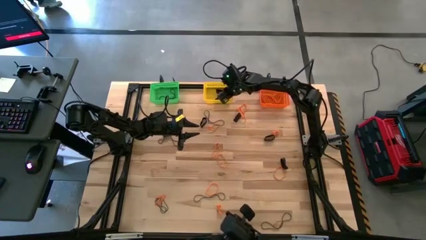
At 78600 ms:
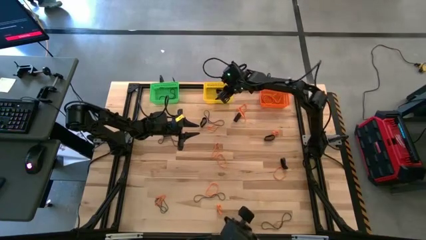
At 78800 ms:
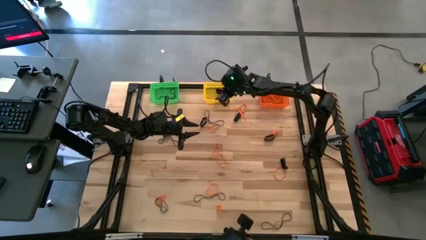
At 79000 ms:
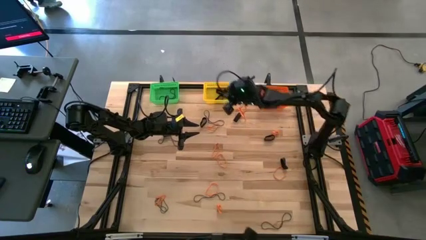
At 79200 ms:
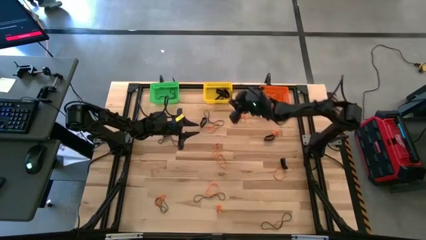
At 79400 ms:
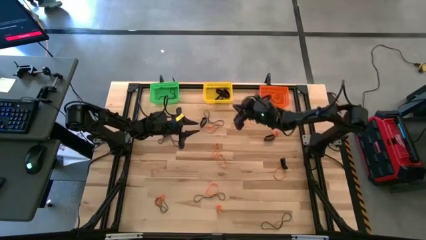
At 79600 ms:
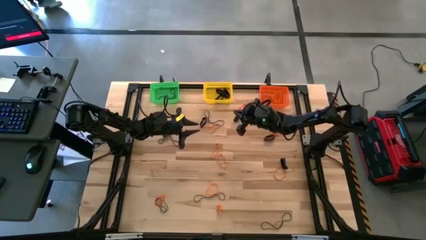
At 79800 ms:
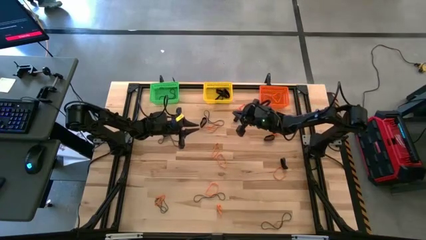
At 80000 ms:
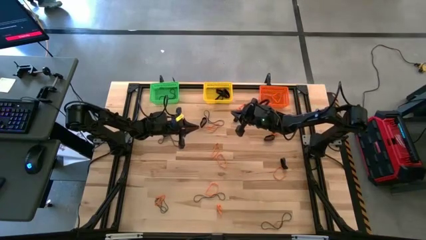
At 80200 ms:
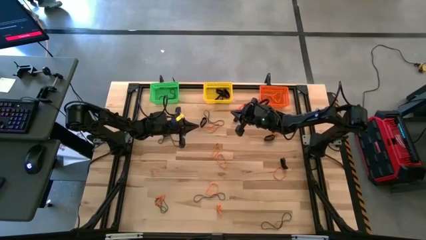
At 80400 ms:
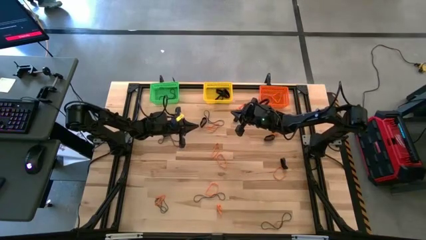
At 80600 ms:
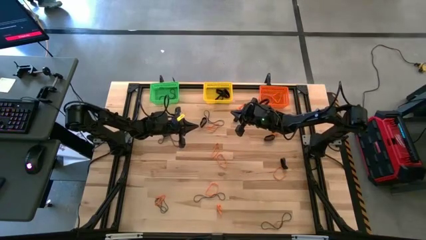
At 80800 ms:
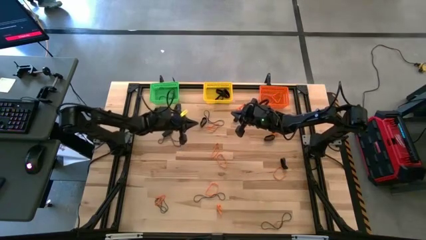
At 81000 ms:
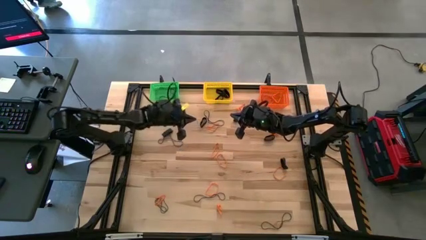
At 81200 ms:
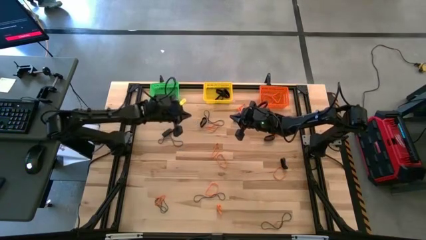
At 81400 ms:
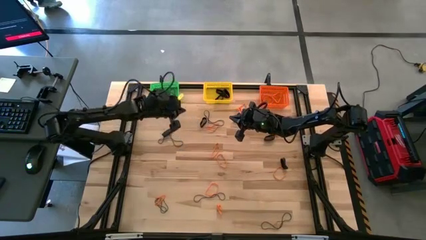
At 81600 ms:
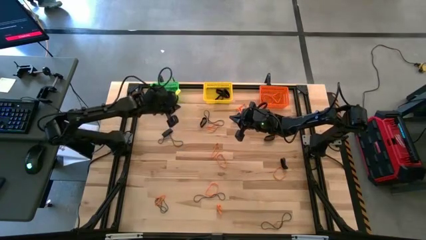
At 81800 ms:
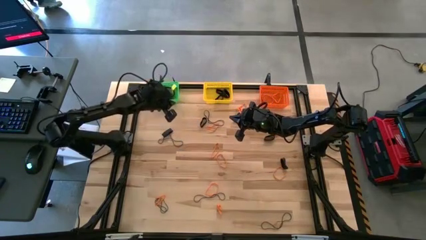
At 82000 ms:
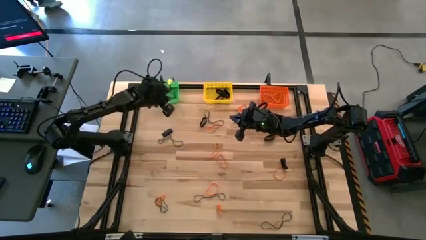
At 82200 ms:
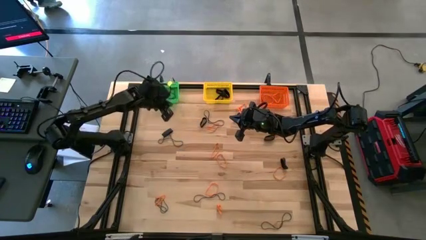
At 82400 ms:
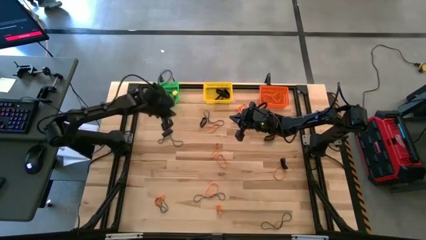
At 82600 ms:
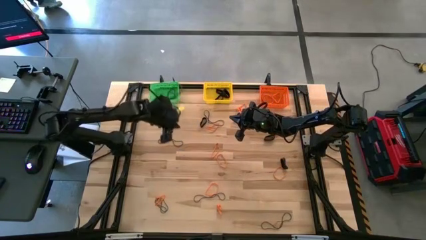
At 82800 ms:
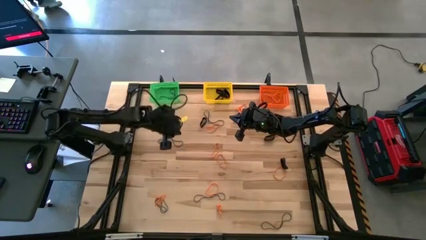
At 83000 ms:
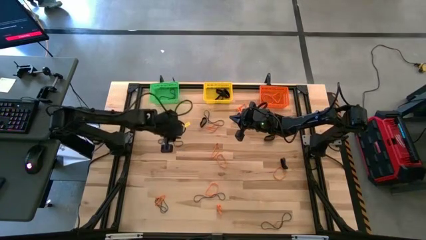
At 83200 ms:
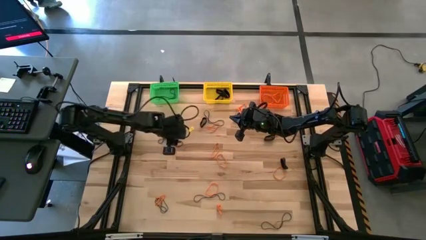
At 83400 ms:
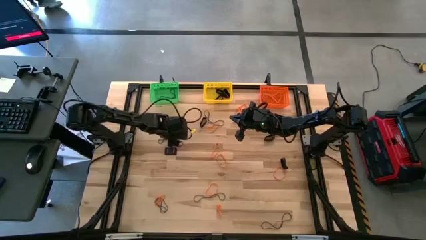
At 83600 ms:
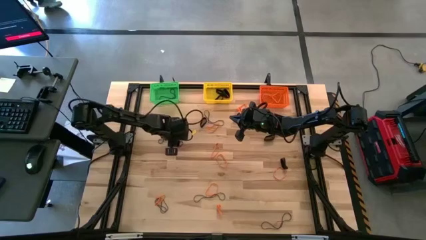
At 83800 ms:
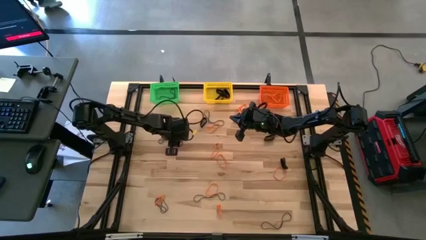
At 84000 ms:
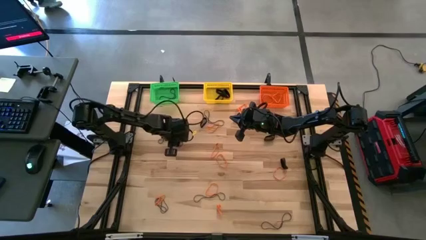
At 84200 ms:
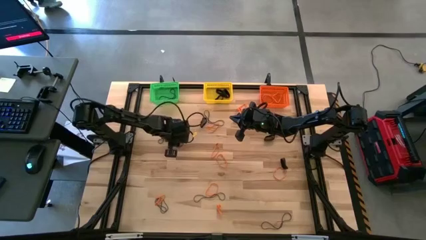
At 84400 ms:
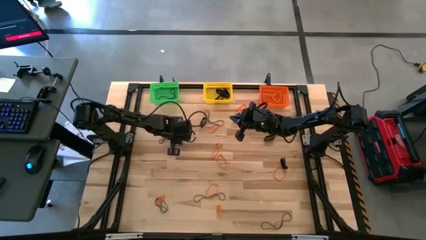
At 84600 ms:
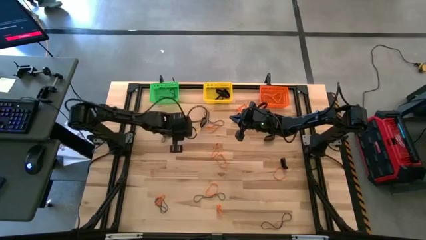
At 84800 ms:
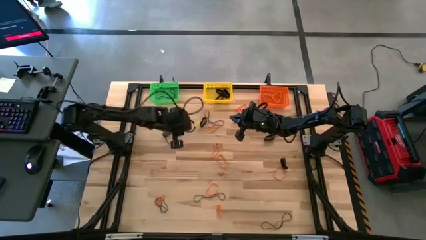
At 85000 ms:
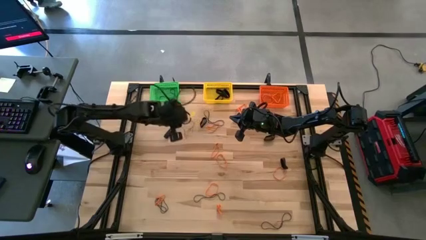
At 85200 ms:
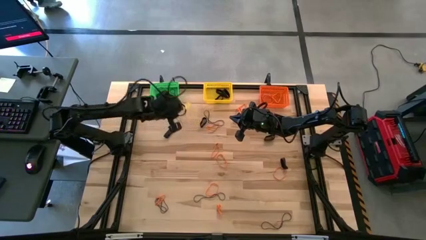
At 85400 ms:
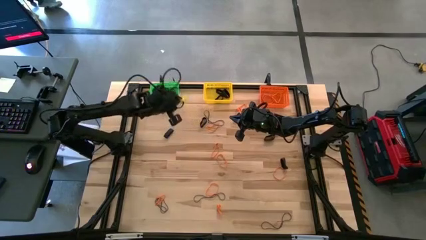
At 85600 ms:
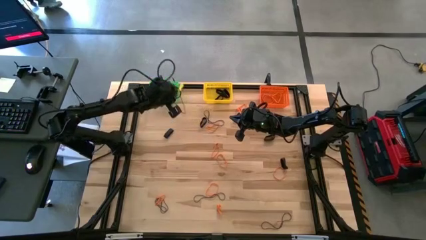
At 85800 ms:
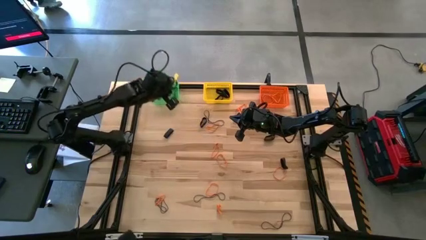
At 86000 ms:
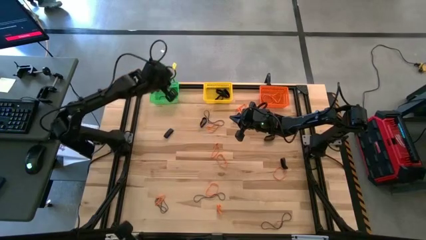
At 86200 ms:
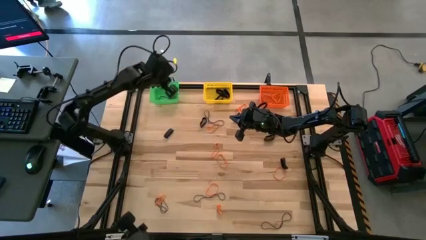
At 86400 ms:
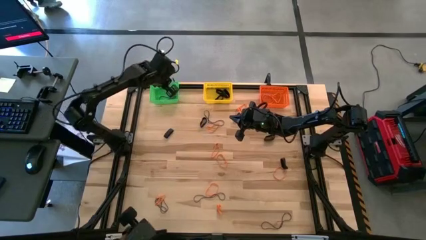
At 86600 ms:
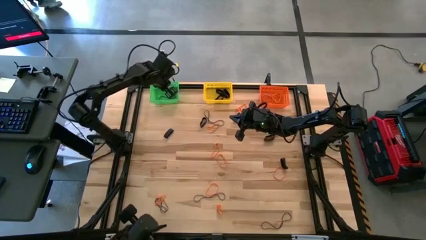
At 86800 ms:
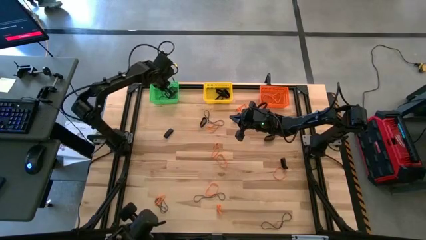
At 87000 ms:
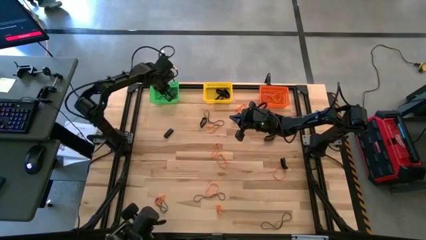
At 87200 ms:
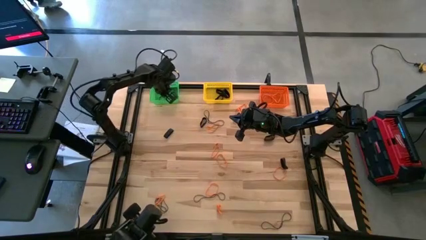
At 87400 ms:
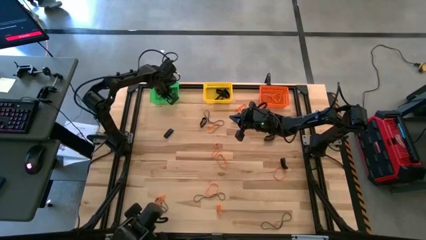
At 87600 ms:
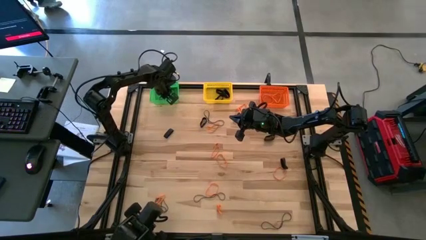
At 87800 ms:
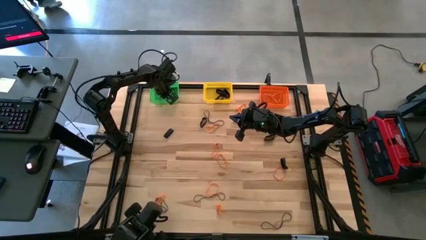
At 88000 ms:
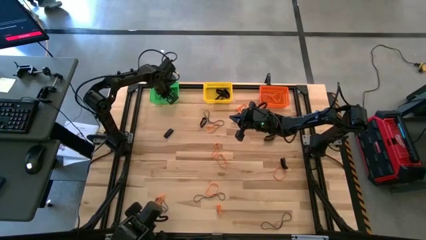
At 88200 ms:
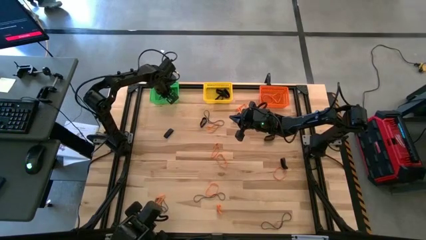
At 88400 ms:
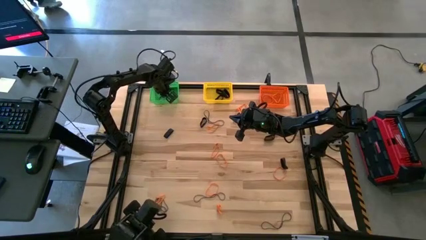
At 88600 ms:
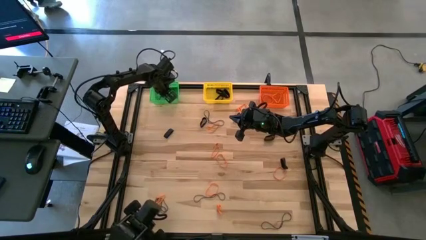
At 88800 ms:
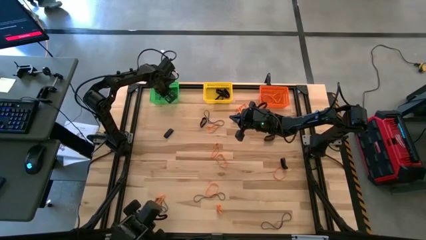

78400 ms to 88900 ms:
Task: Sort rubber bands into baskets
Put the purple rubber band into the green bin

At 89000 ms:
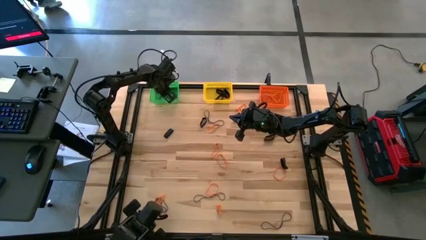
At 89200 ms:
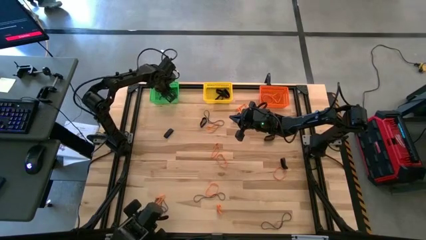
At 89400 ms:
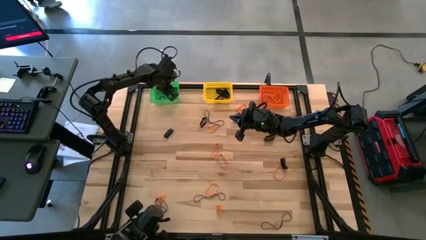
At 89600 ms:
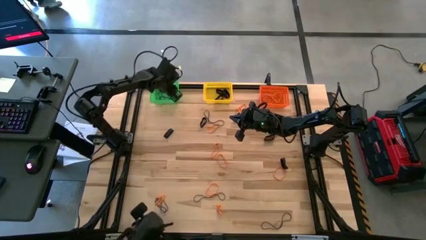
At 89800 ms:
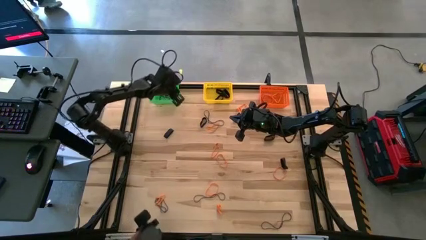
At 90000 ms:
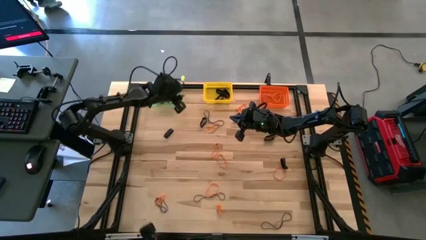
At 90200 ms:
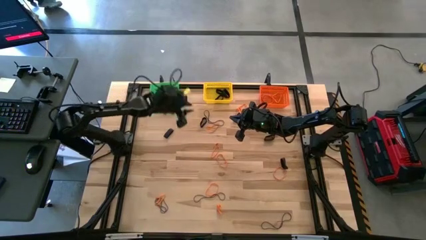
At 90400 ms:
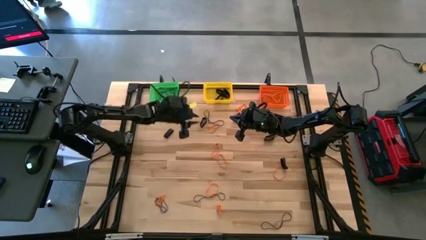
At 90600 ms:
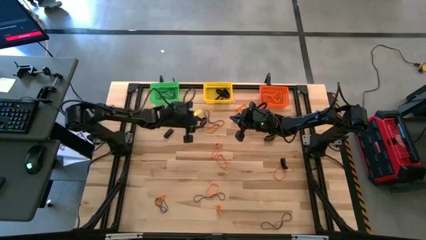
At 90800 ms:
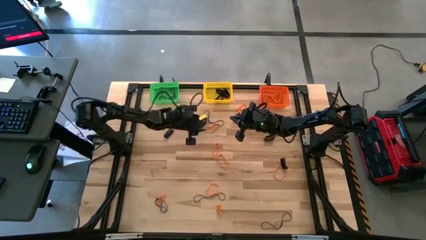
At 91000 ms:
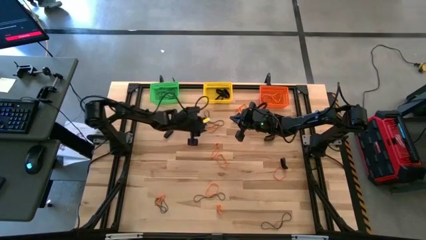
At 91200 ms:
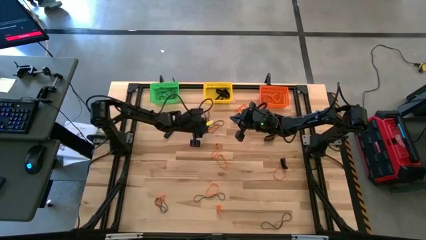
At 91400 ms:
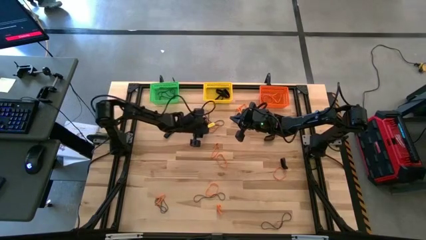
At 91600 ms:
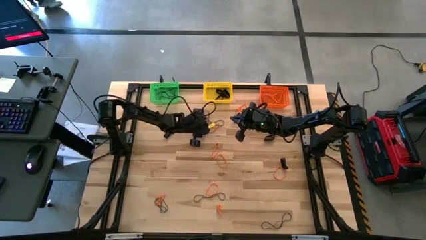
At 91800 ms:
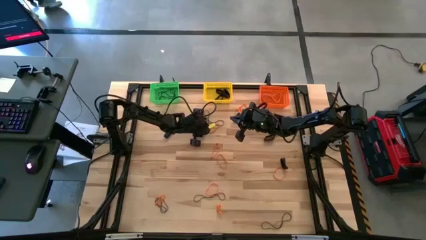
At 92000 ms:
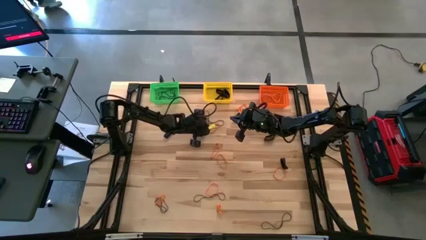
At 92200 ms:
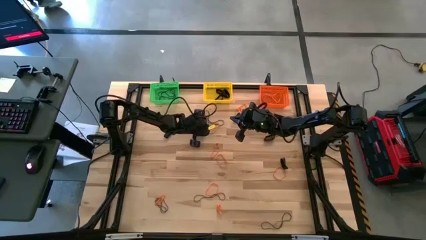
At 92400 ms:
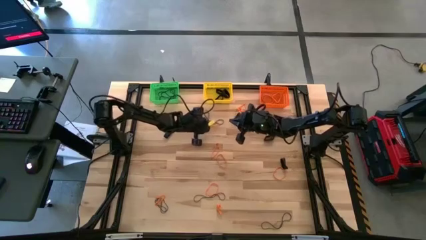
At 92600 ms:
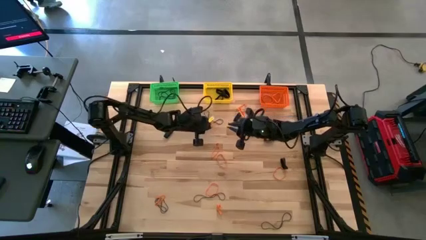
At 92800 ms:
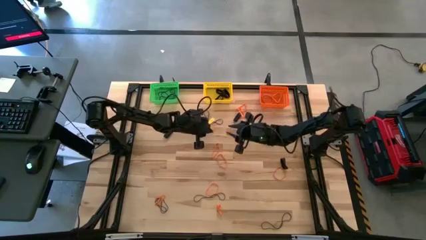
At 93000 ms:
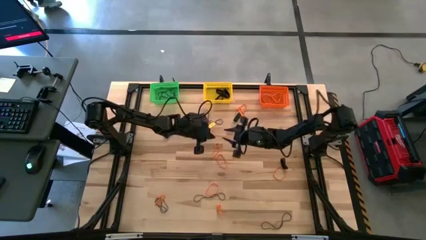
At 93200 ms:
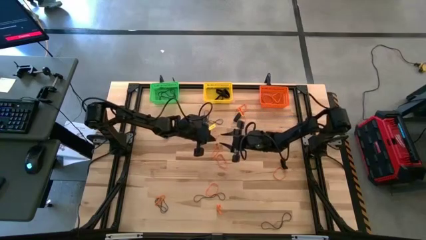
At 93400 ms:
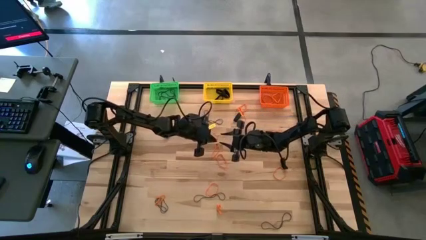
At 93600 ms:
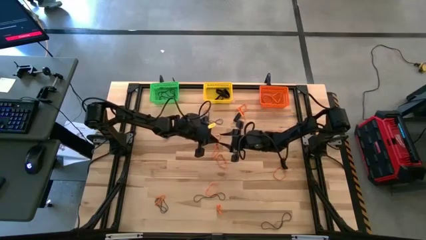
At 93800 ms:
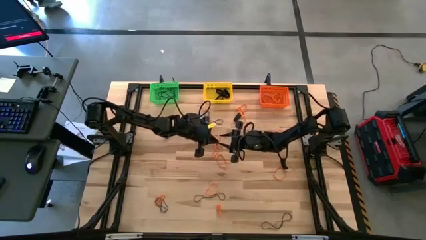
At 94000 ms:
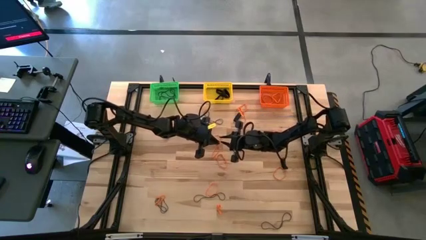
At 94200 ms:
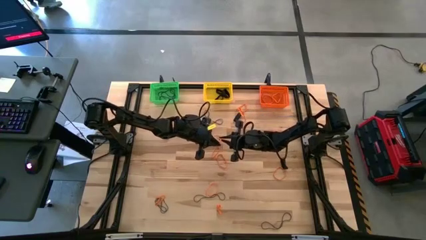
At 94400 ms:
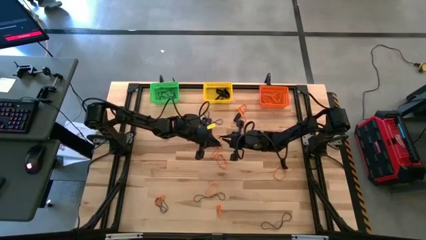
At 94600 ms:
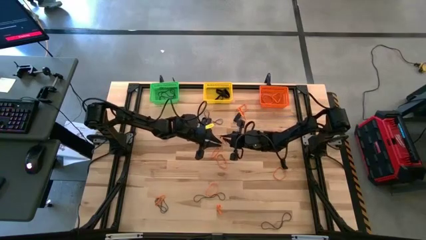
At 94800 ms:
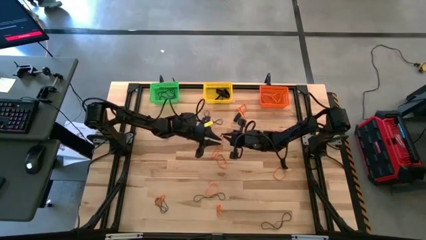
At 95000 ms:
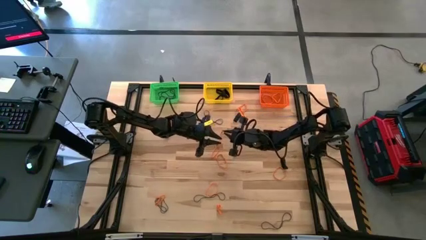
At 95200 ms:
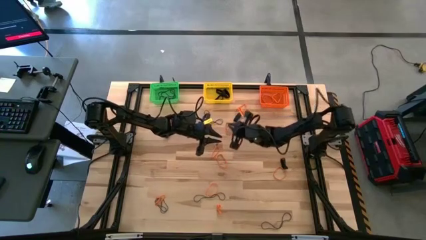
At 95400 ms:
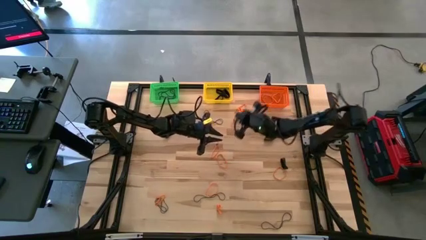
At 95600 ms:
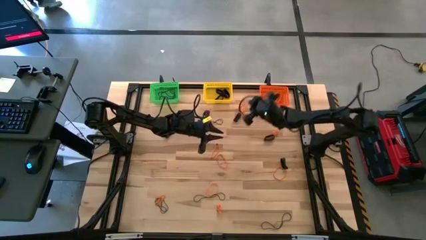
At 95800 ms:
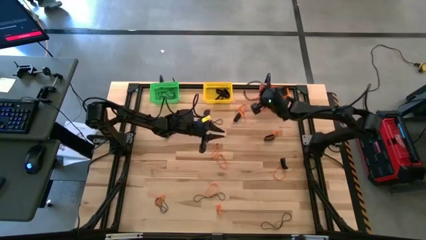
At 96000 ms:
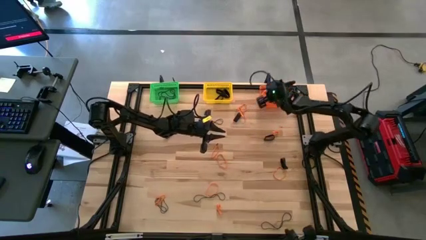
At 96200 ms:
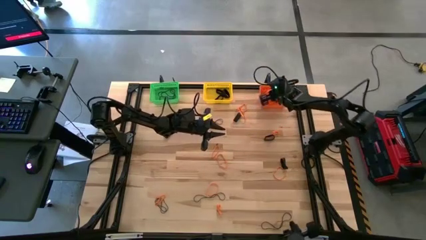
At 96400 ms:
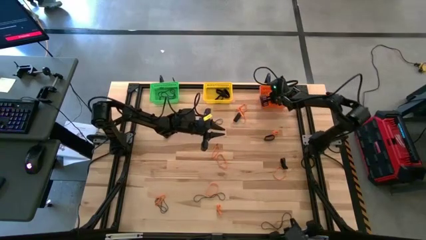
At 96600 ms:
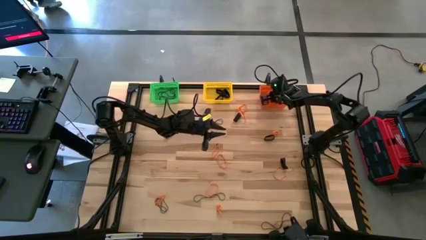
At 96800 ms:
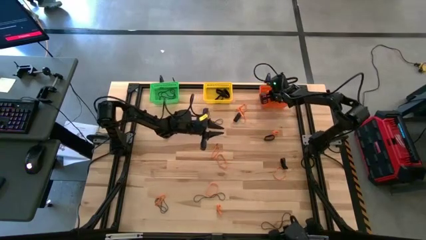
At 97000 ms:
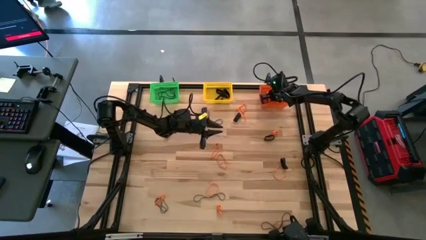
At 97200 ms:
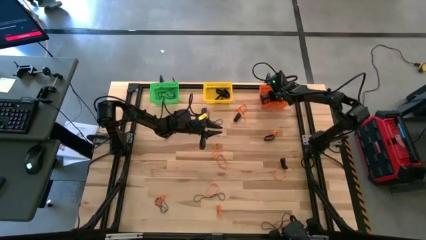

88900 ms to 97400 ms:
Put the orange rubber band into the orange bin
